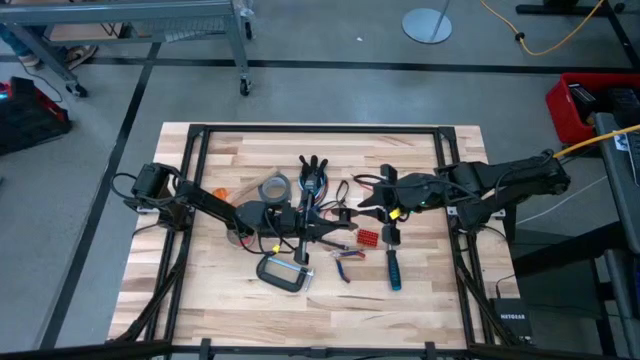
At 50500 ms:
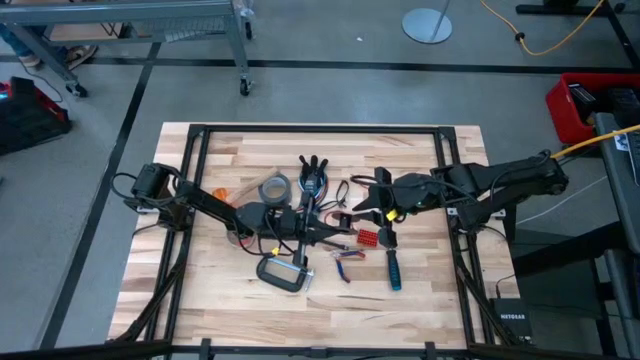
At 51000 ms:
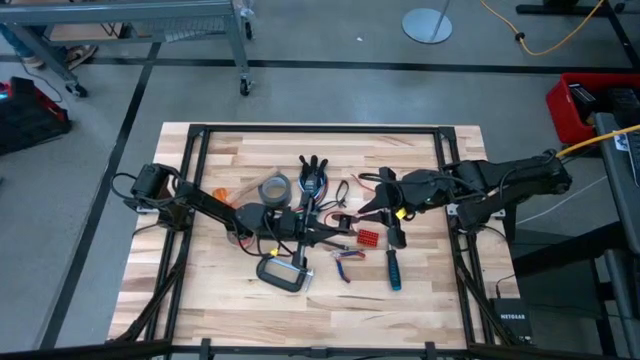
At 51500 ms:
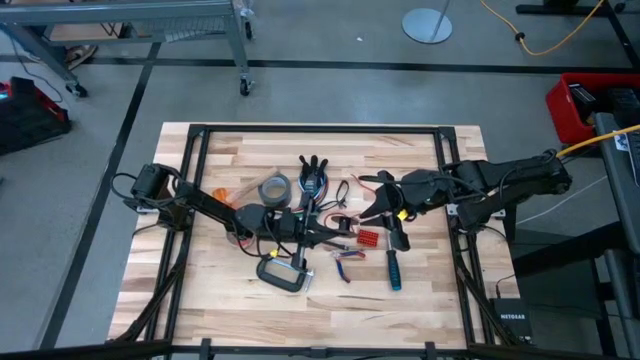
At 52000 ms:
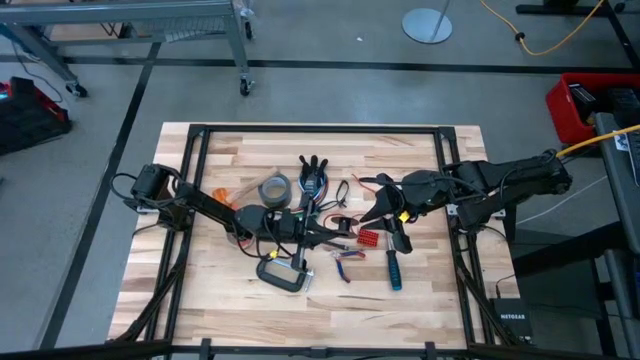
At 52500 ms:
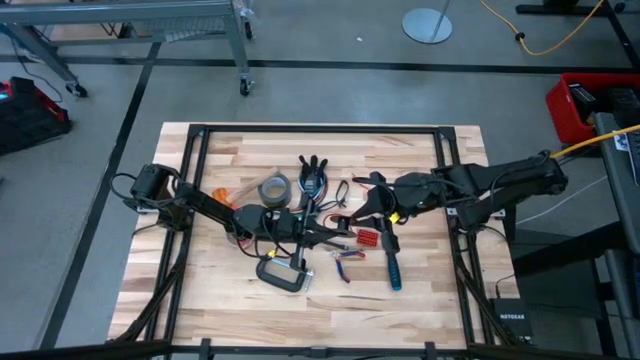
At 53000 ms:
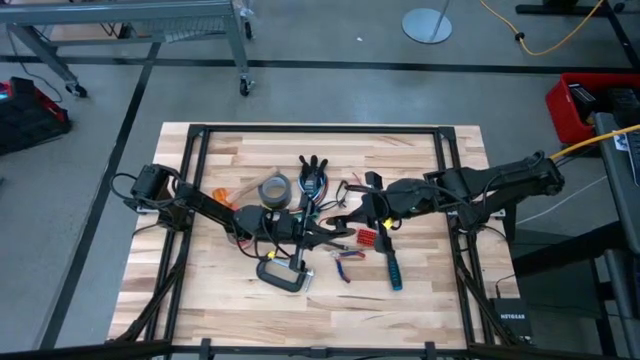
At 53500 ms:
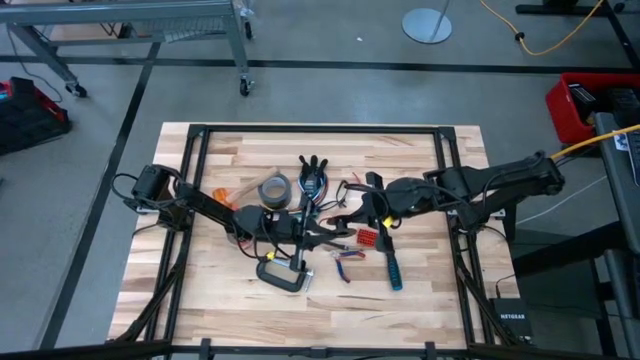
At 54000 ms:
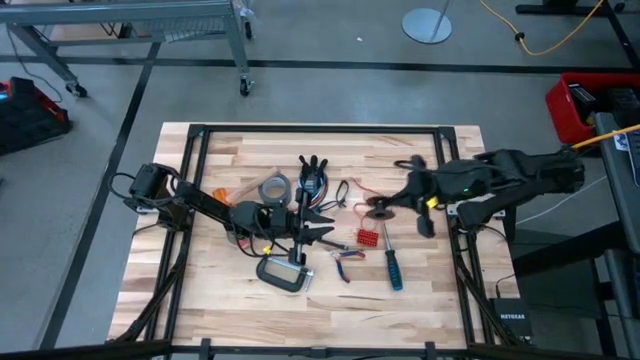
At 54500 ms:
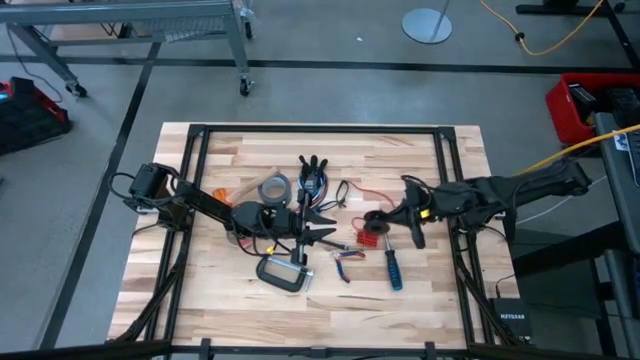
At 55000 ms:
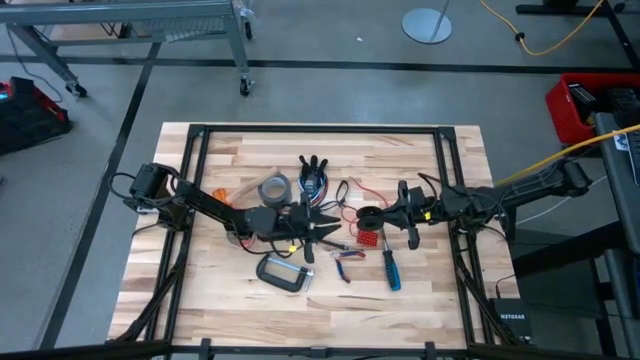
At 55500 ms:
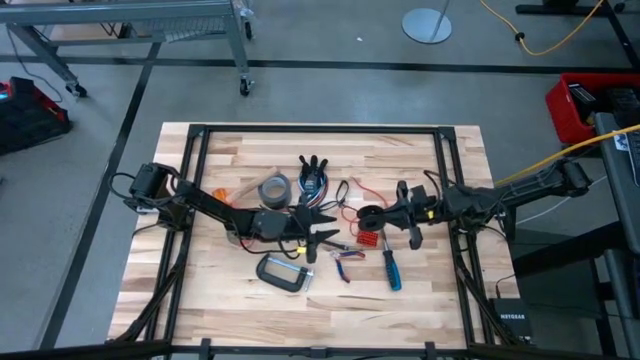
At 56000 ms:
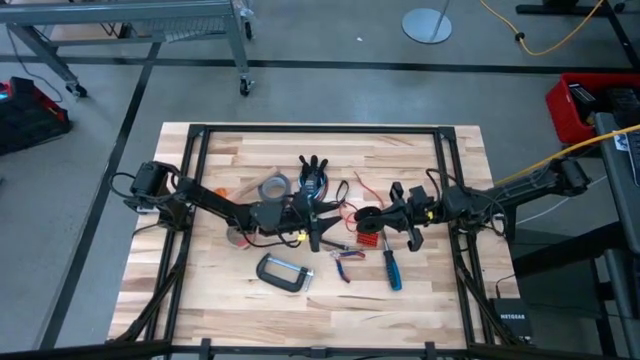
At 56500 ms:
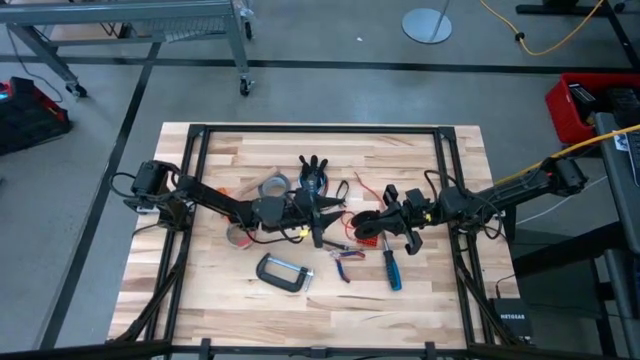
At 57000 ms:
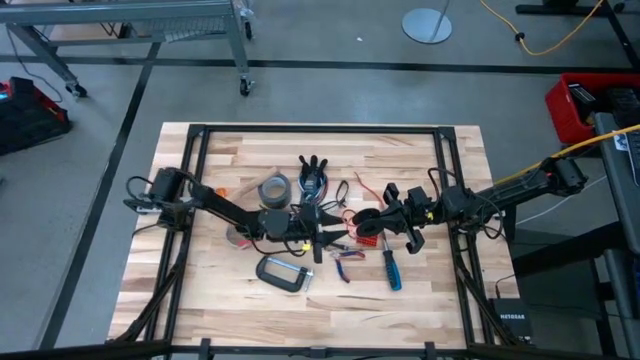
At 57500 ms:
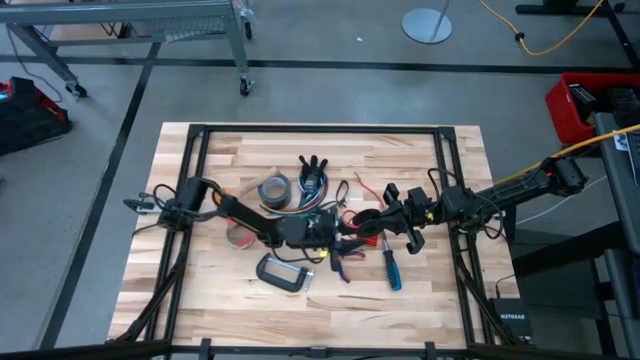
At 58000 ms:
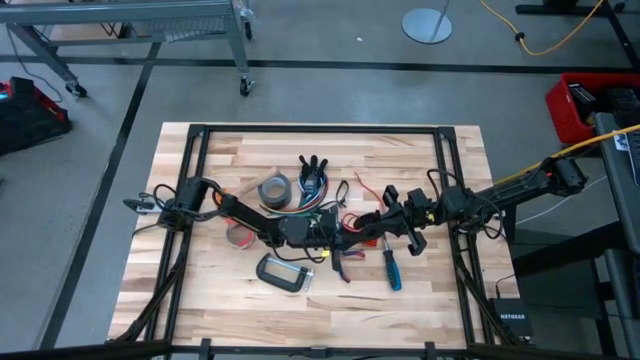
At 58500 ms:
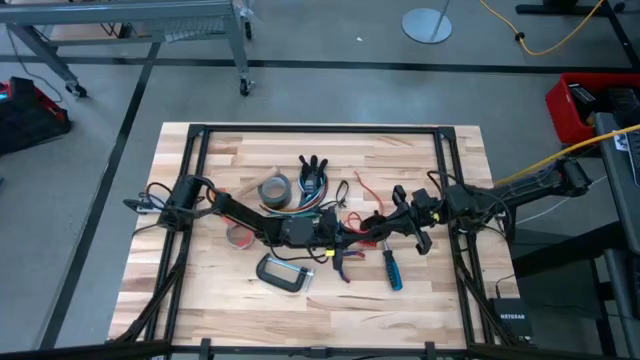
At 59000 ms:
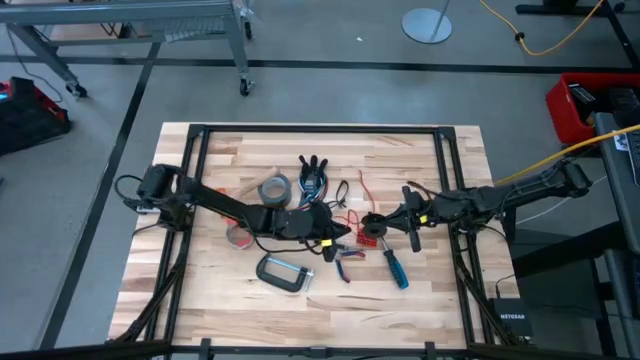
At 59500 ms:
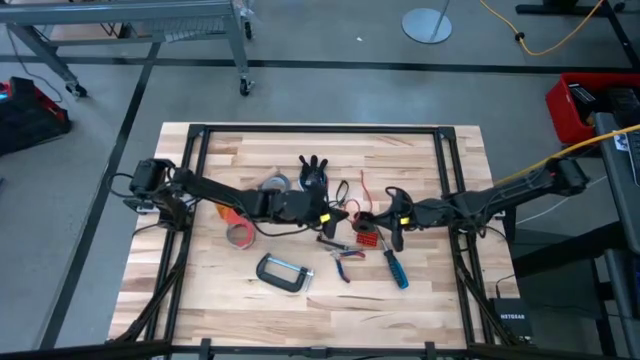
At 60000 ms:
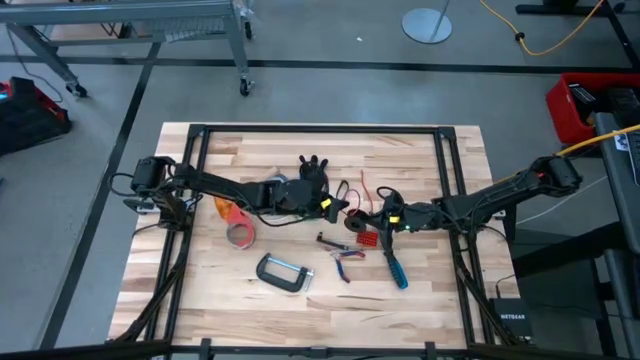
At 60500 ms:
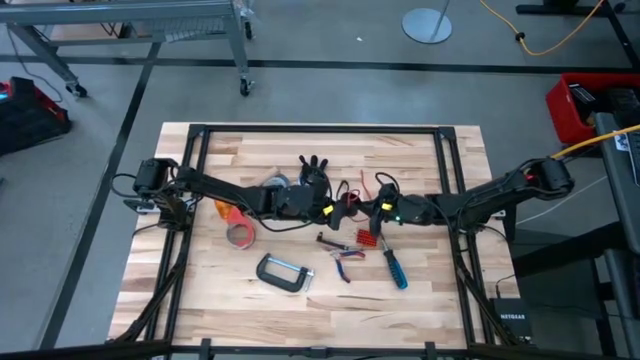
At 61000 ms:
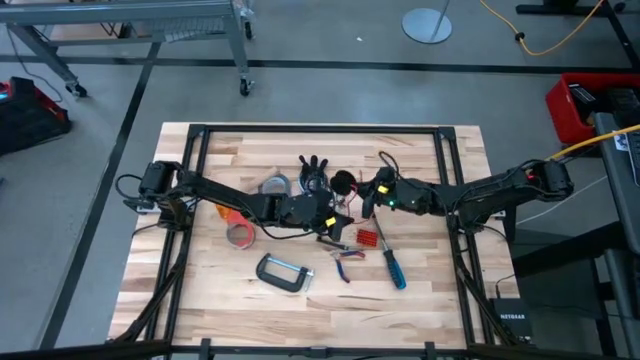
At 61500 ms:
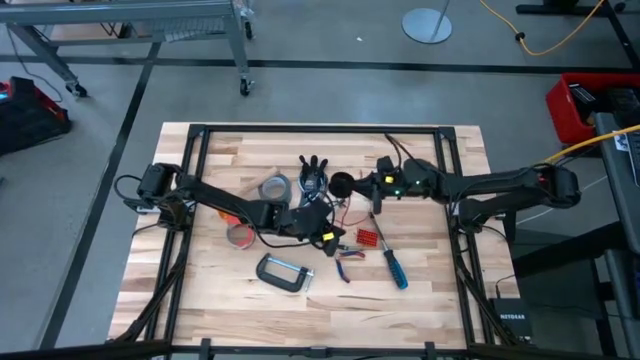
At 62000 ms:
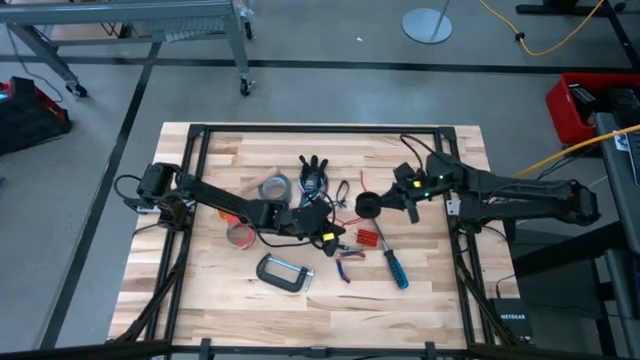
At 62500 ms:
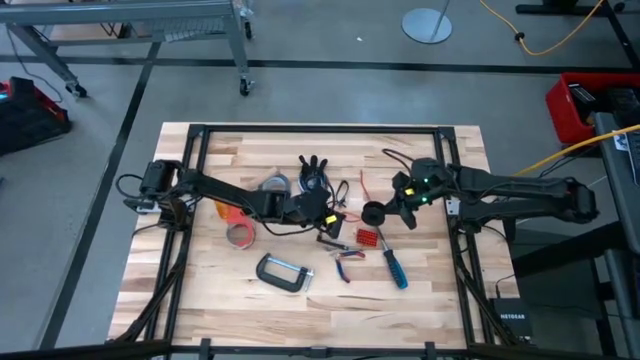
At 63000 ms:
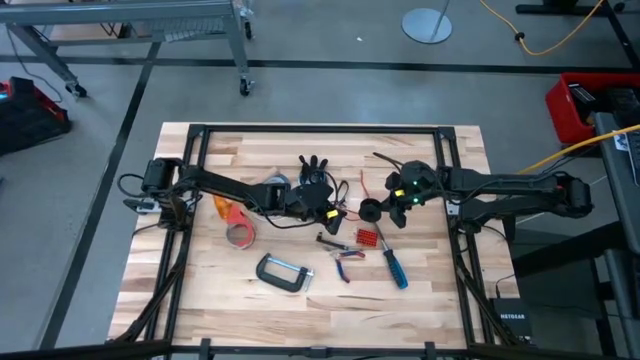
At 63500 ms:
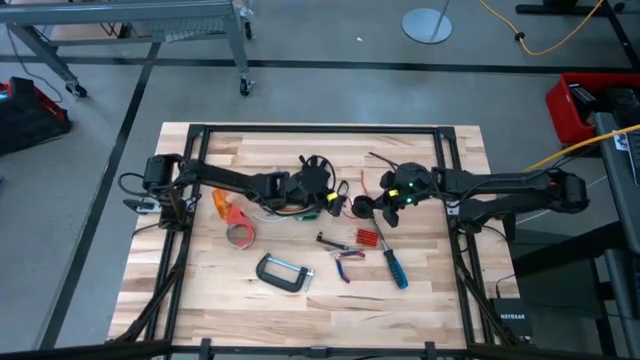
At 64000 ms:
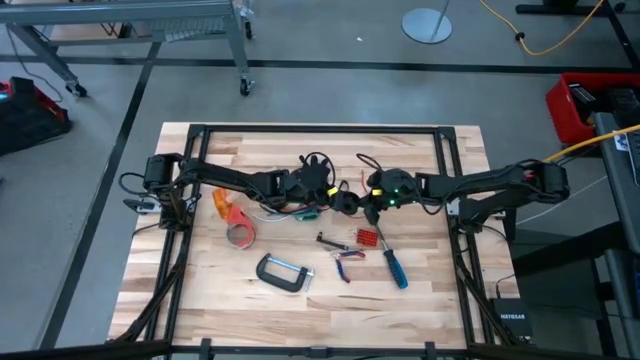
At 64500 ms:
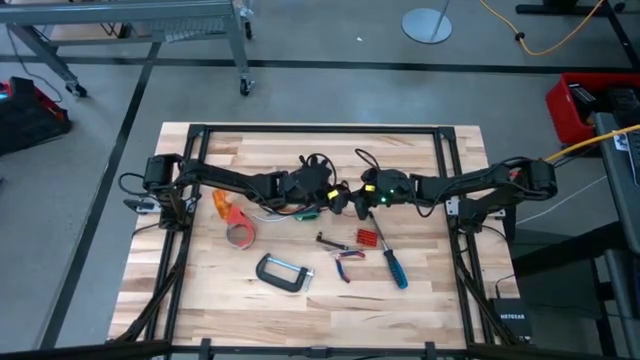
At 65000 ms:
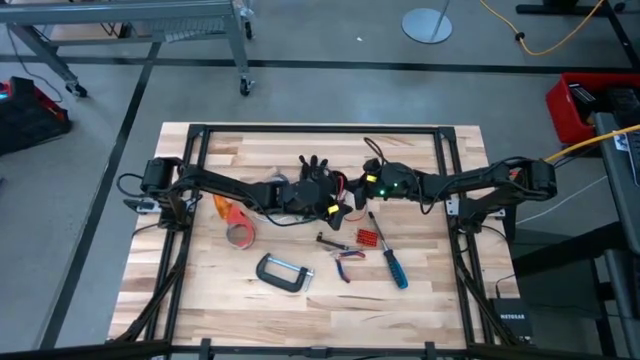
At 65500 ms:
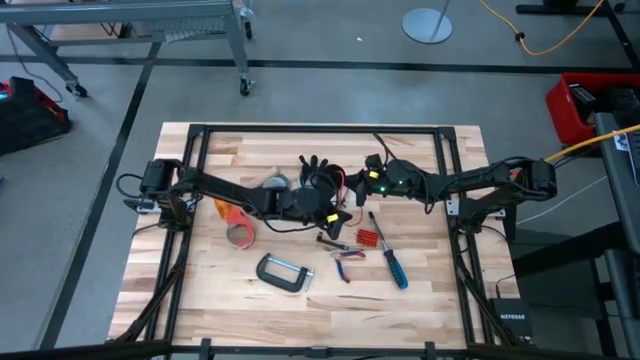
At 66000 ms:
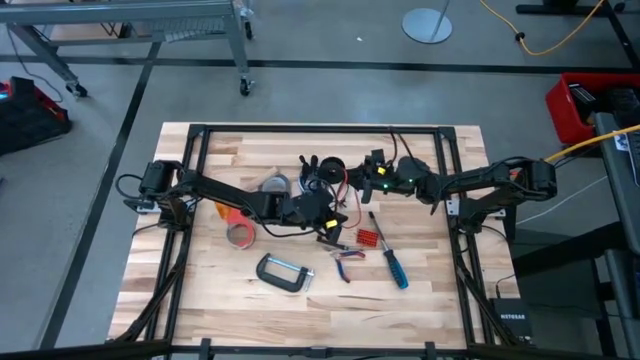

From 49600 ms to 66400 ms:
Task: Coil cords
Coil the red wire onto a black spool

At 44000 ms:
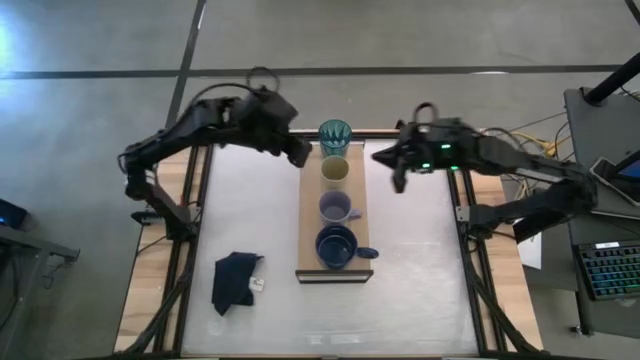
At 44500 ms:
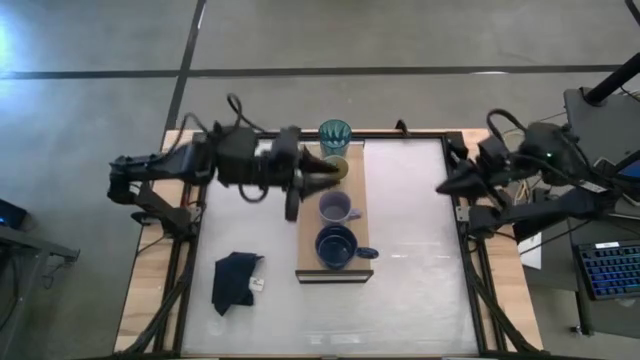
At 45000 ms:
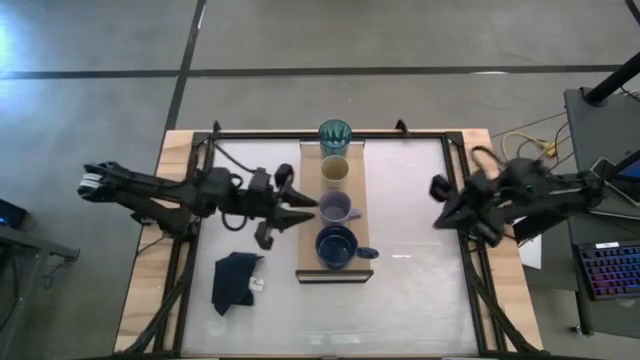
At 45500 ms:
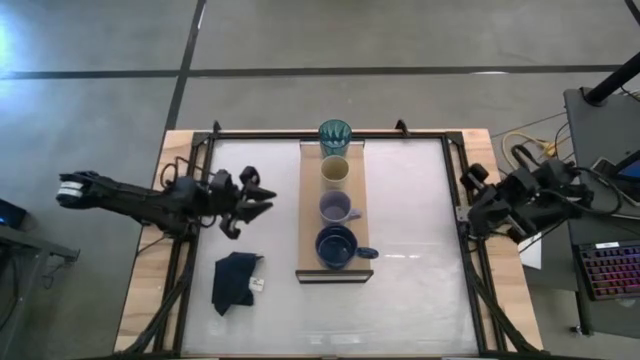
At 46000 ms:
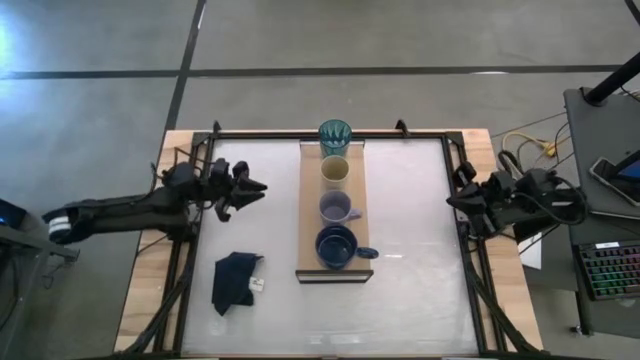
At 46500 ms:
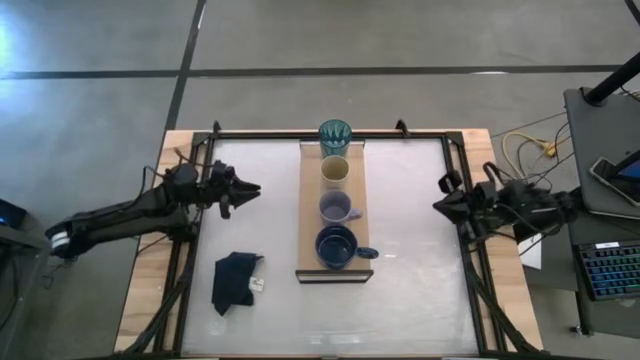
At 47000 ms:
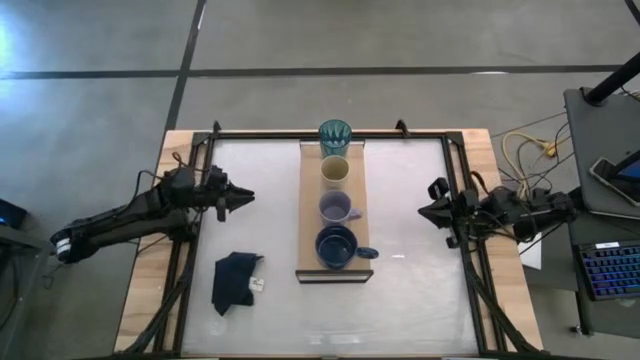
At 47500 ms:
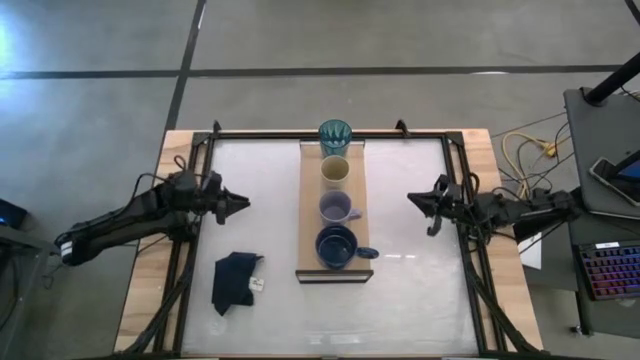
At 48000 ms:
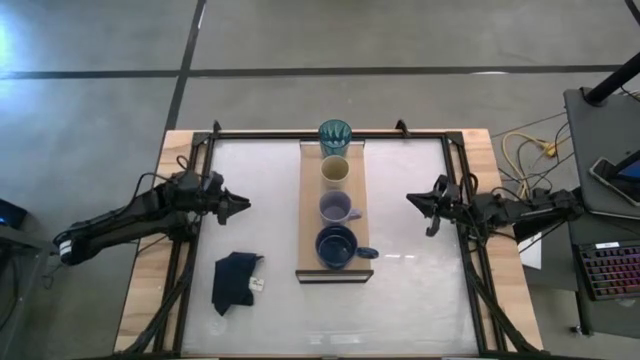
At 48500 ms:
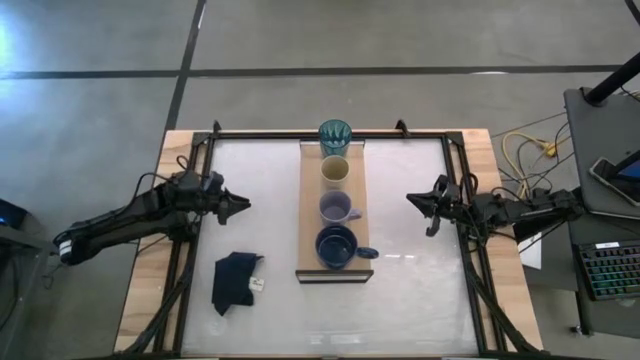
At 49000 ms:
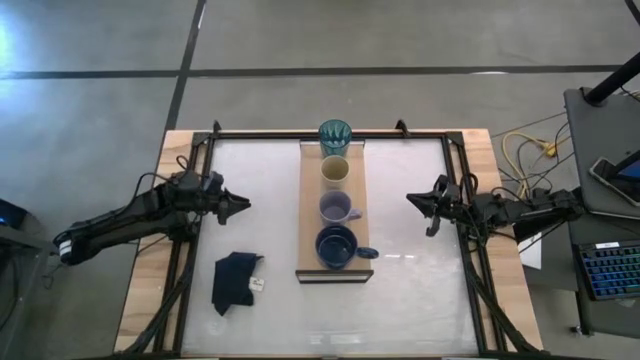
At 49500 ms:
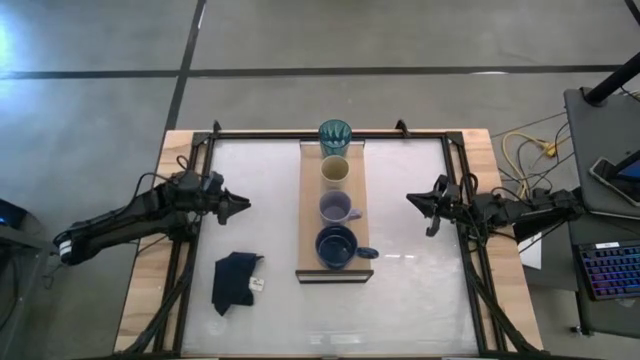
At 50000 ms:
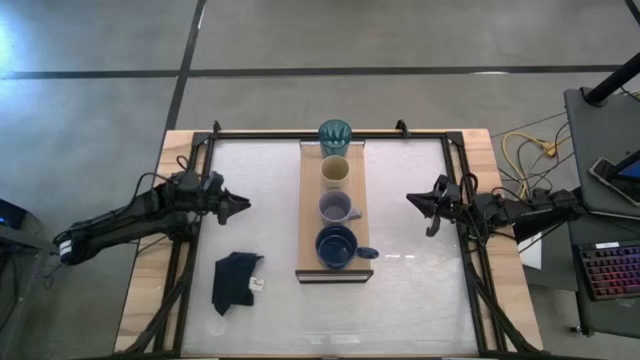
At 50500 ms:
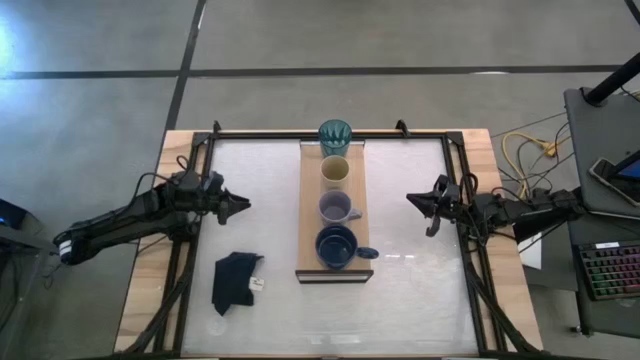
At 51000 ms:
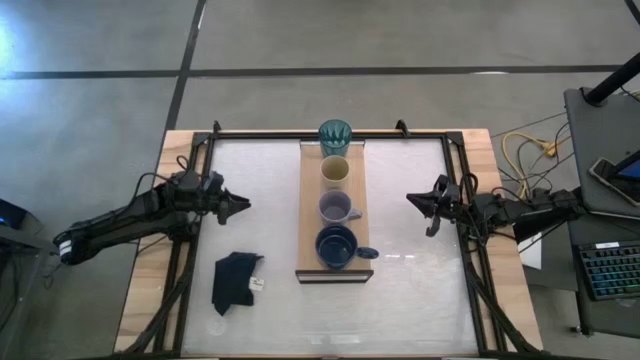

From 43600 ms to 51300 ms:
Task: Stack small to large cups/mugs on shelf
Return to Home Position
